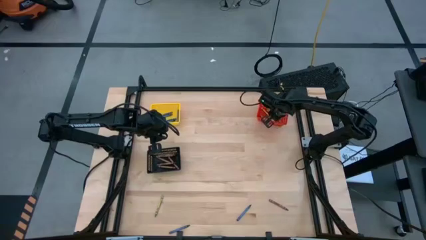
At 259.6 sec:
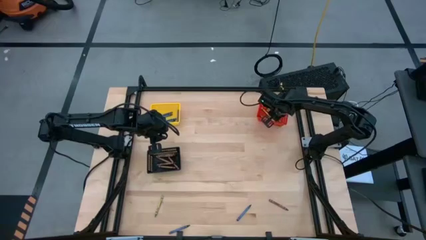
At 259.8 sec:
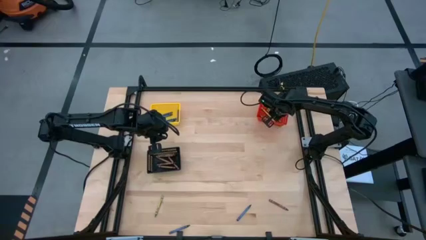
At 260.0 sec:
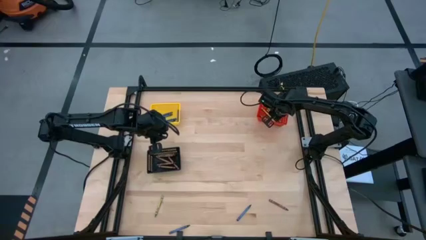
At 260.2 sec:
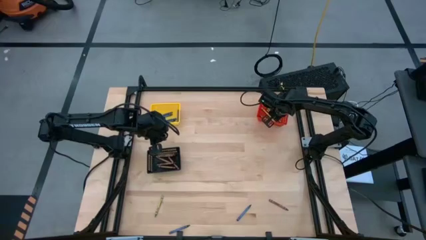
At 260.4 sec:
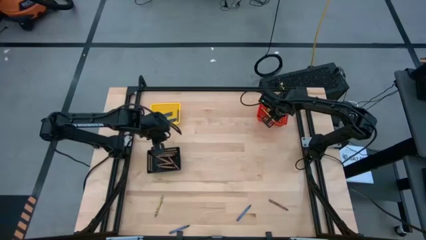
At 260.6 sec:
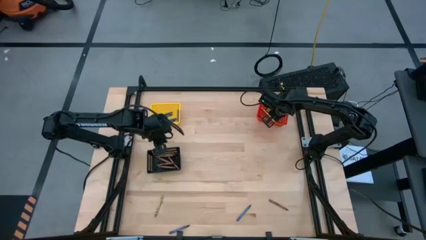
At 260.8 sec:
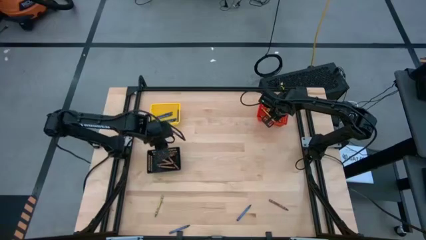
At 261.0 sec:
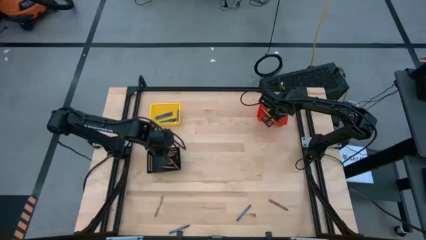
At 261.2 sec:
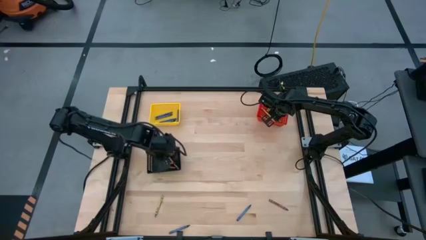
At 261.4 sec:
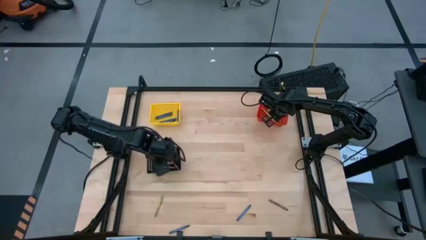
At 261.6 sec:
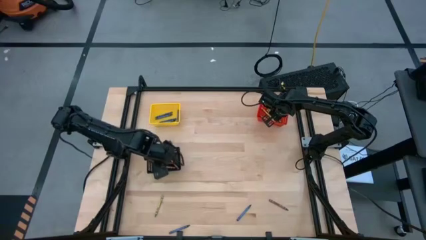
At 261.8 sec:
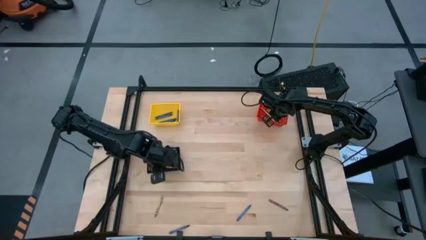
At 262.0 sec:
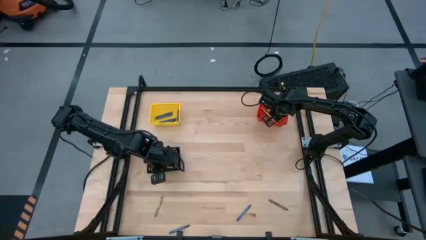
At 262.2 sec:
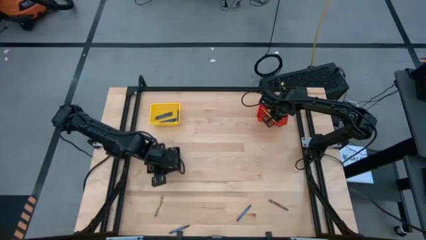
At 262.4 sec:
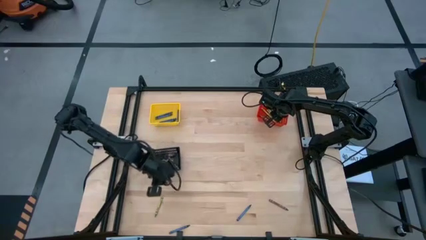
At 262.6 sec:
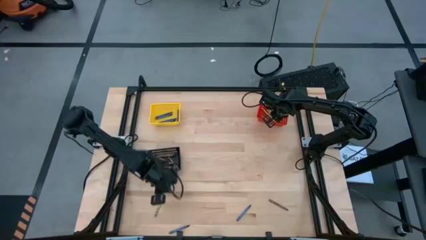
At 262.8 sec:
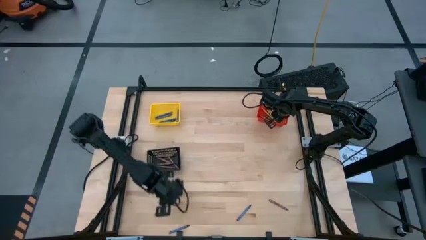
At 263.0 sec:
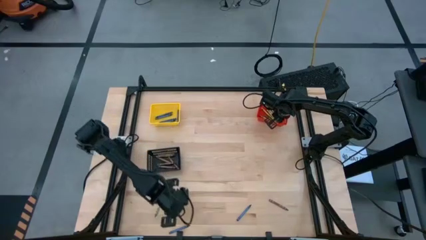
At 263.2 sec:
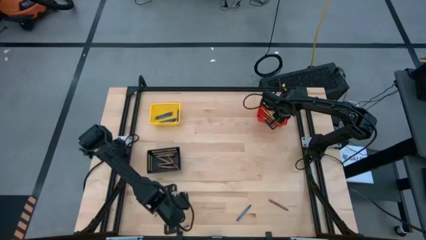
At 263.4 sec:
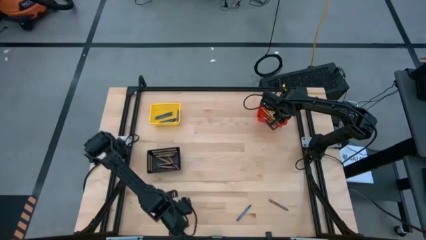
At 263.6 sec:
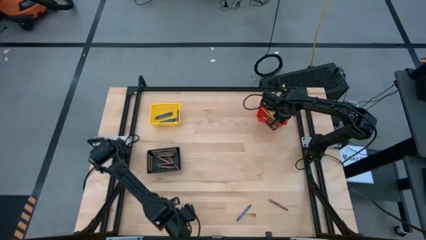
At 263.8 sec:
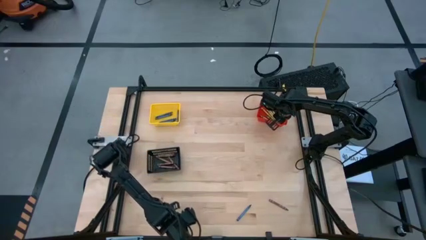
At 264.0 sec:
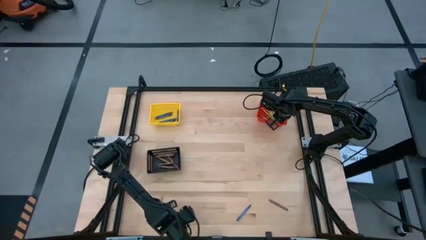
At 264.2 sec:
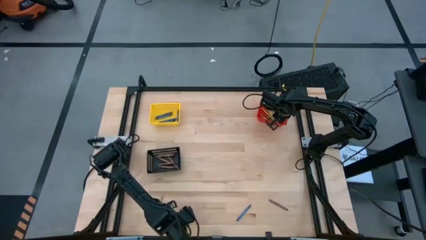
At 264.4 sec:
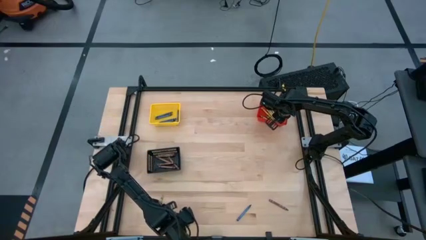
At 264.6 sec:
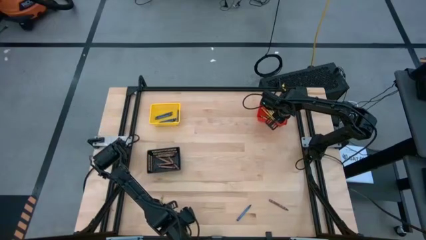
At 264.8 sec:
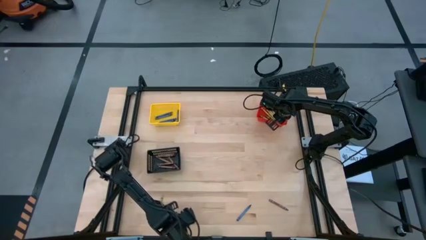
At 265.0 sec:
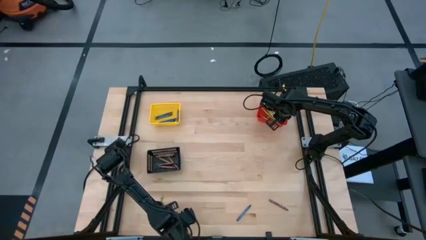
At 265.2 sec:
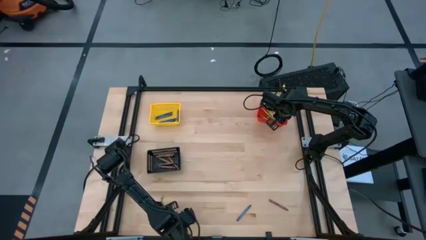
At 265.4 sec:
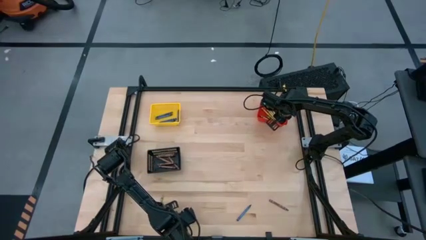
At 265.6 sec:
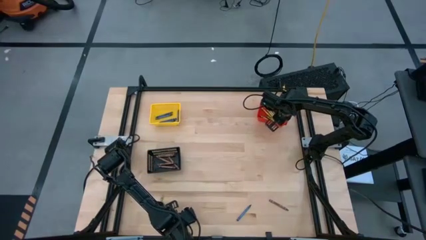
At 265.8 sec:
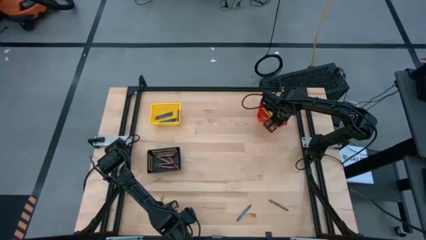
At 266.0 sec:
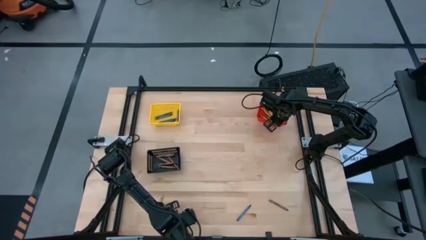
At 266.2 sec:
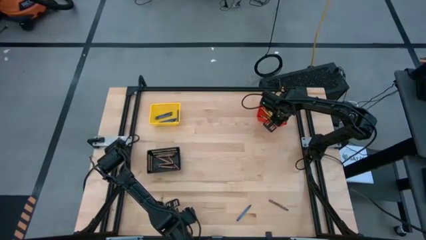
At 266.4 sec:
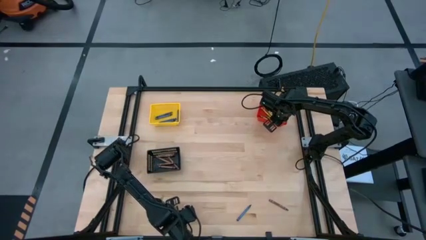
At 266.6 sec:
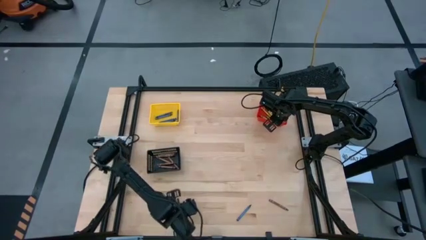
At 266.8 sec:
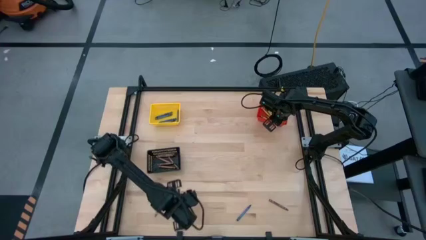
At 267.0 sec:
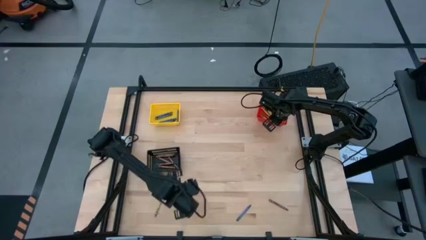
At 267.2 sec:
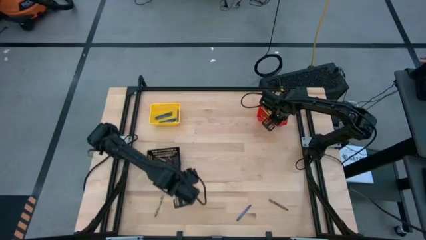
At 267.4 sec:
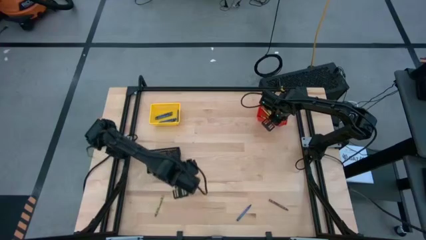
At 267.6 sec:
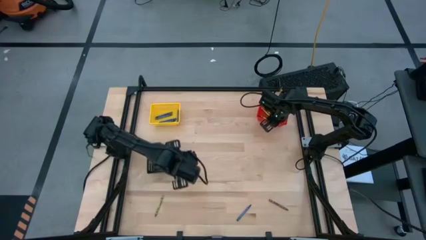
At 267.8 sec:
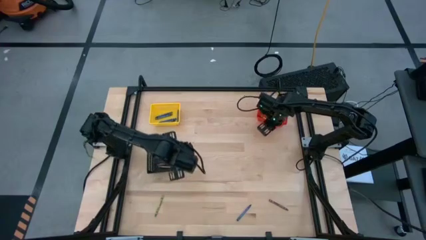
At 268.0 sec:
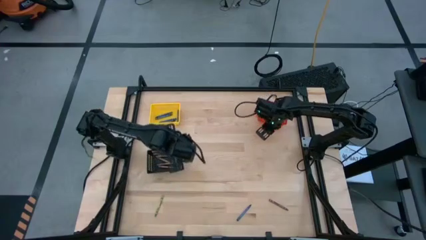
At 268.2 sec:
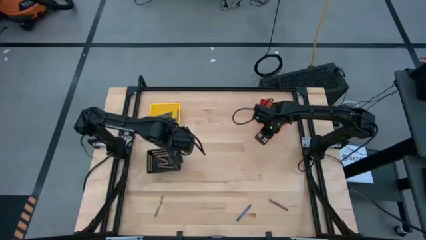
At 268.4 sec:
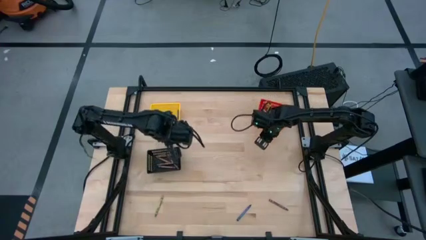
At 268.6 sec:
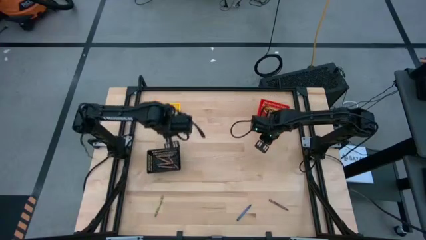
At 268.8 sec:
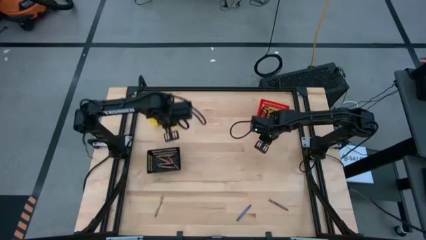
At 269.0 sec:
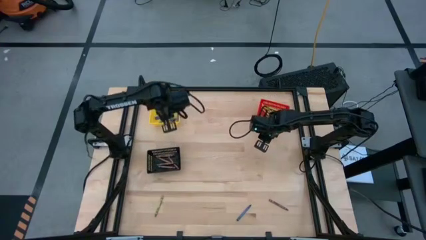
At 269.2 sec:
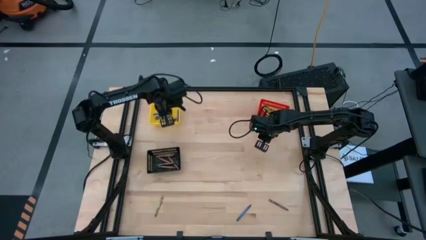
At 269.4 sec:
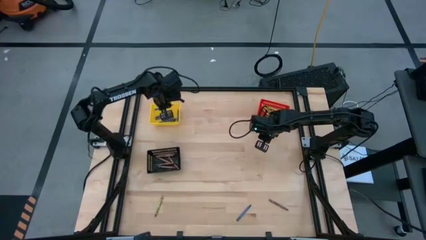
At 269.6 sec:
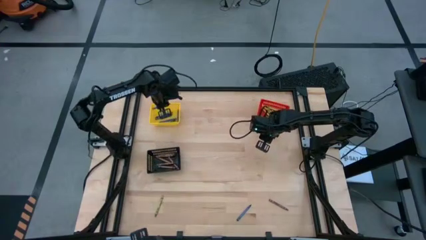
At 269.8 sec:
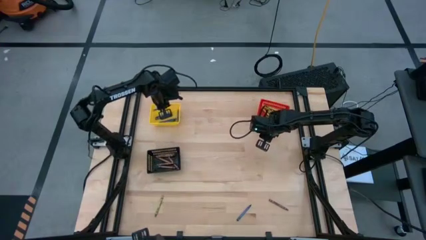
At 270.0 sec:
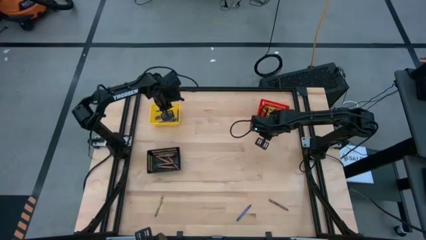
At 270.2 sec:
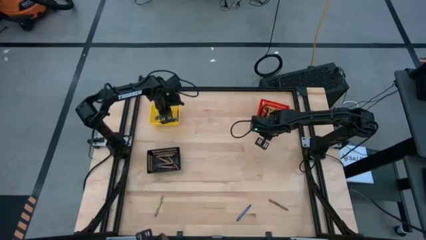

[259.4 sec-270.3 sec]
Task: Sort crayons
Put the blue crayon into the yellow bin
